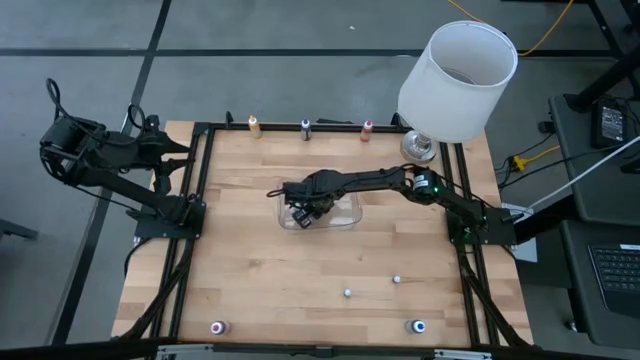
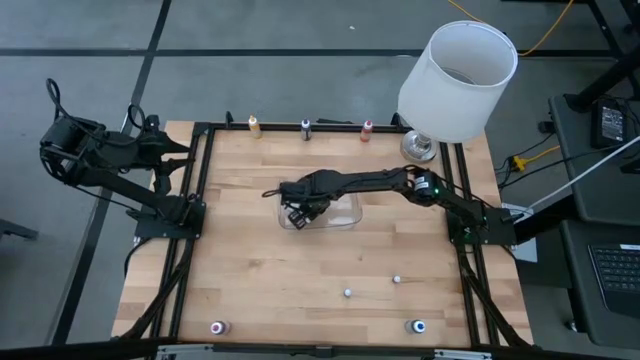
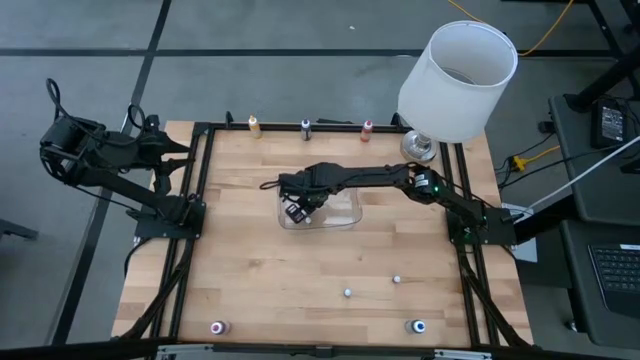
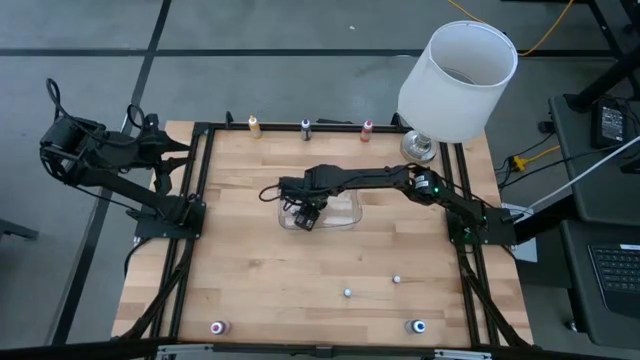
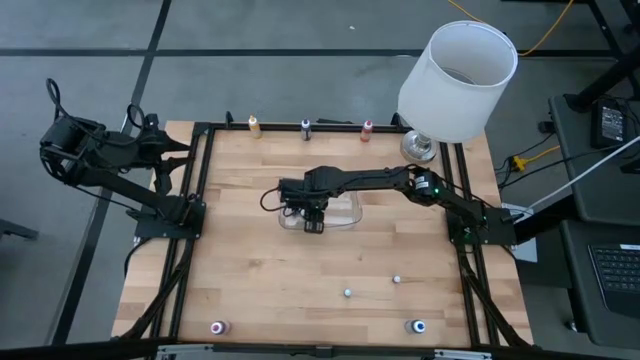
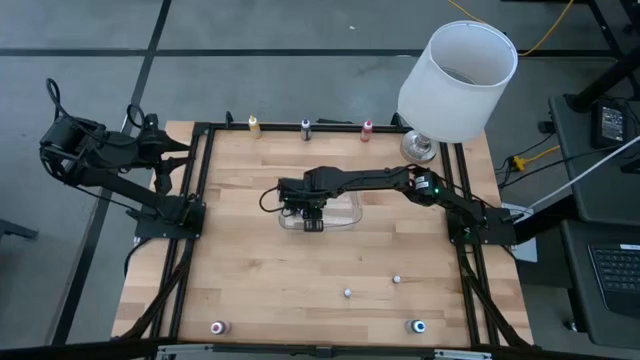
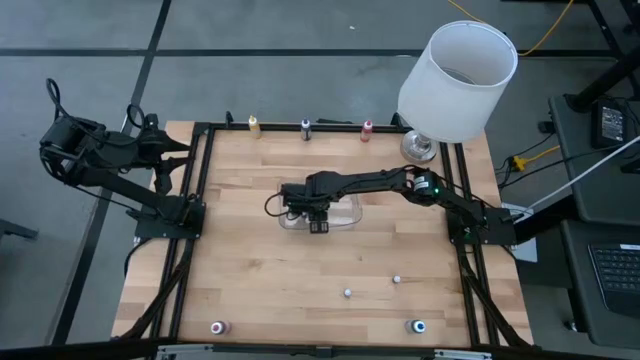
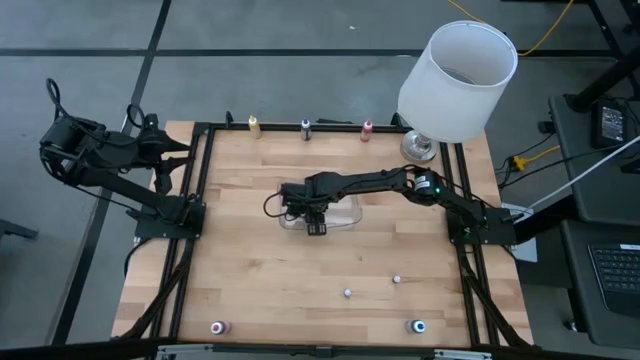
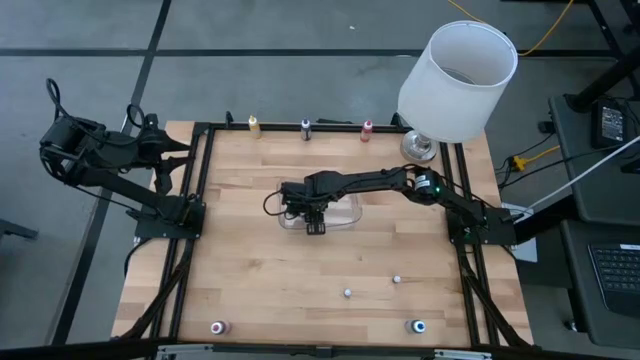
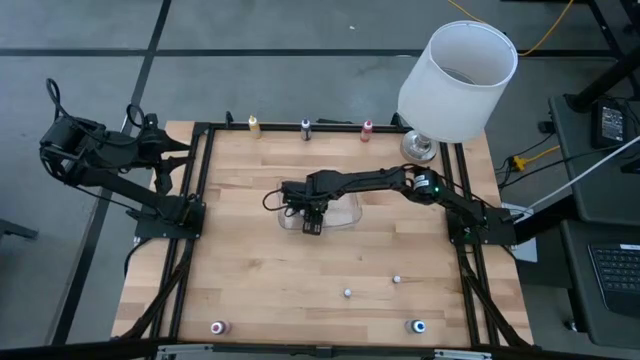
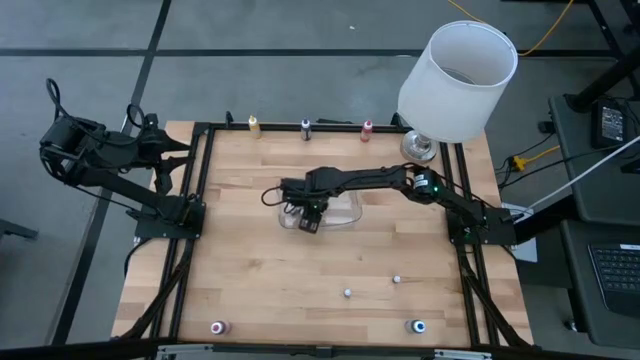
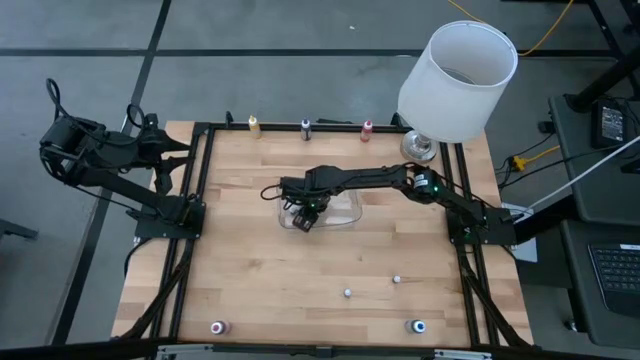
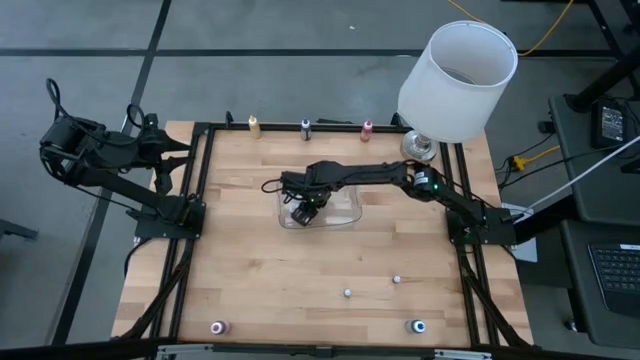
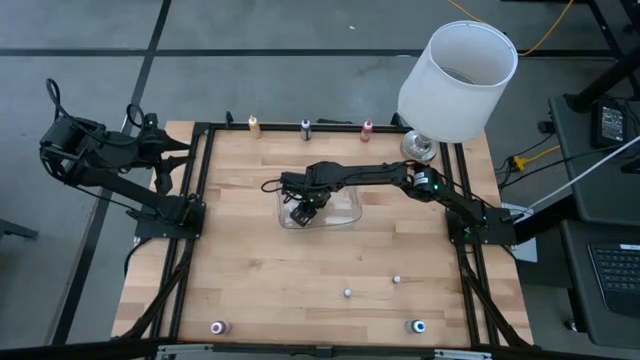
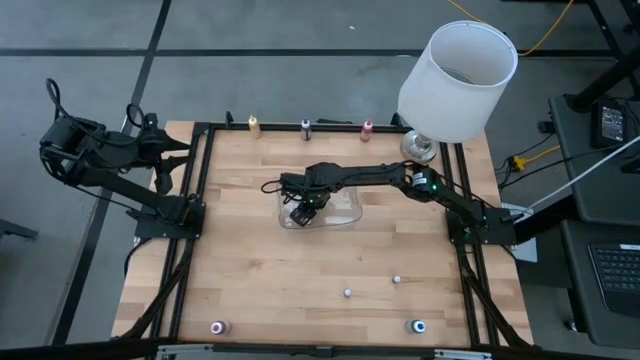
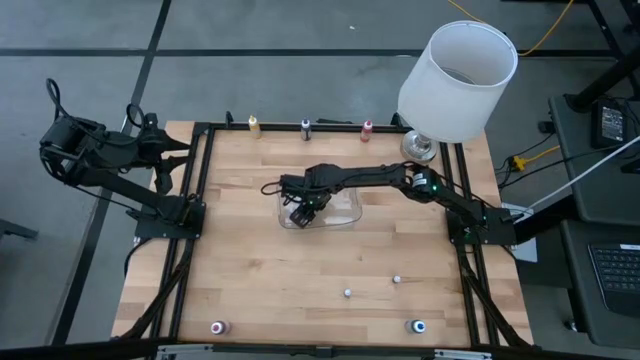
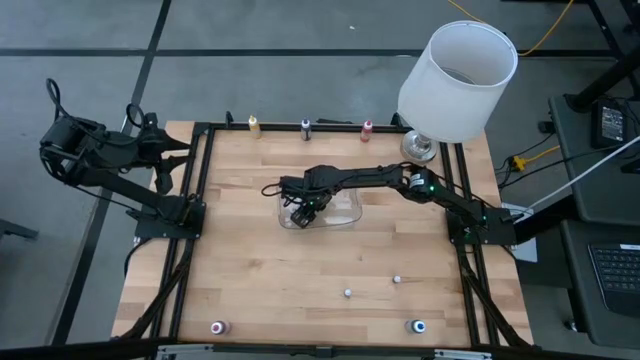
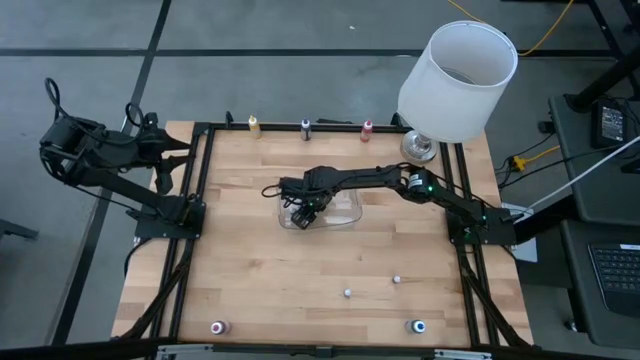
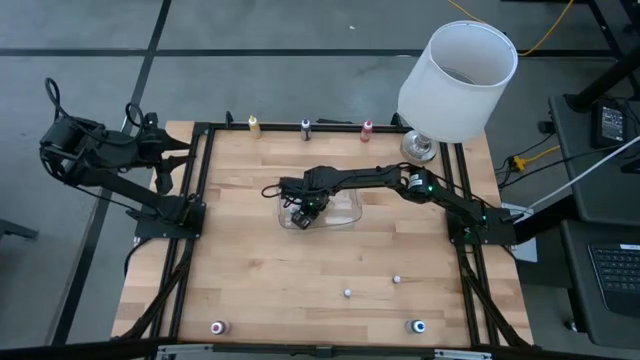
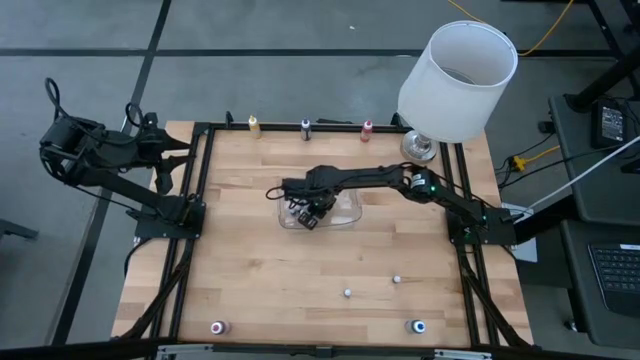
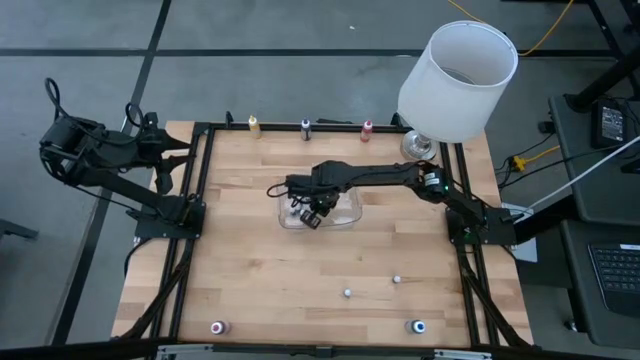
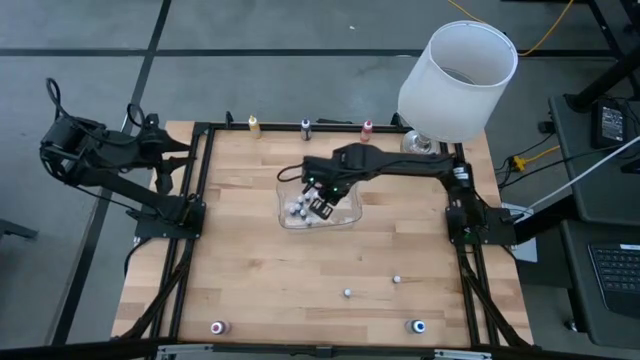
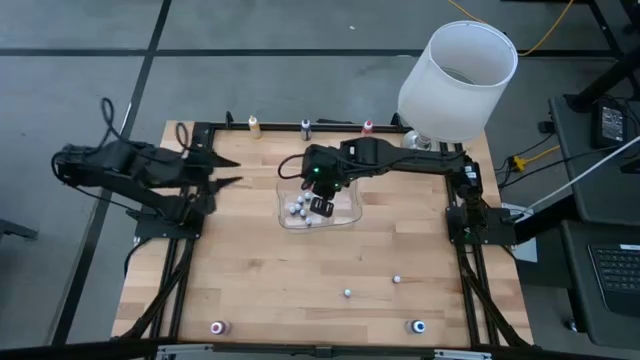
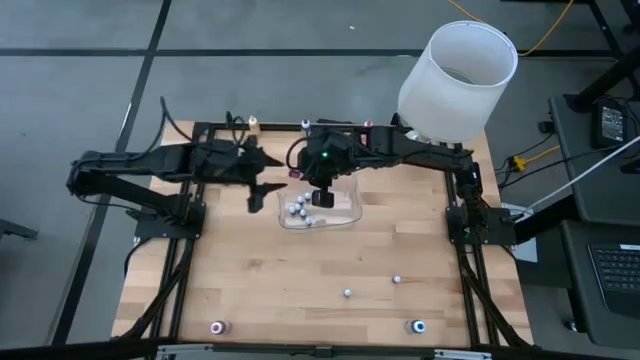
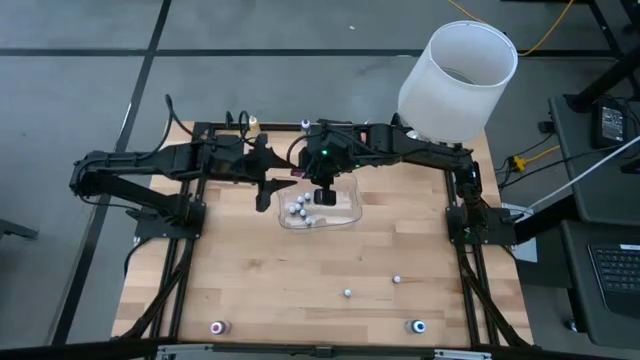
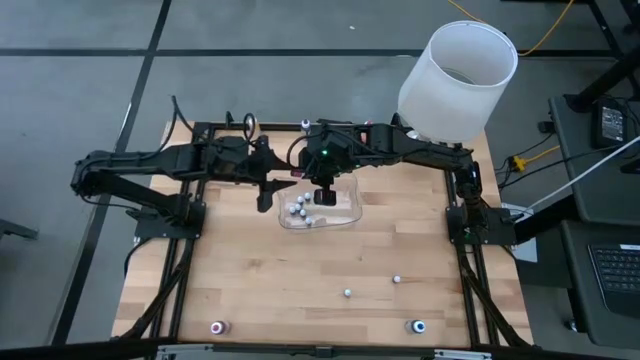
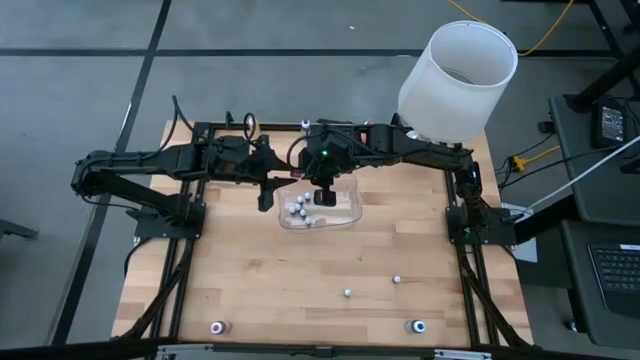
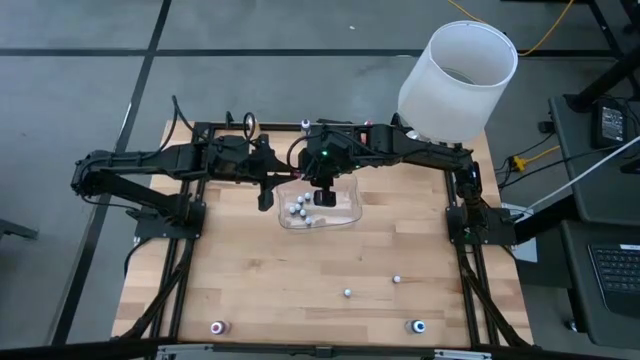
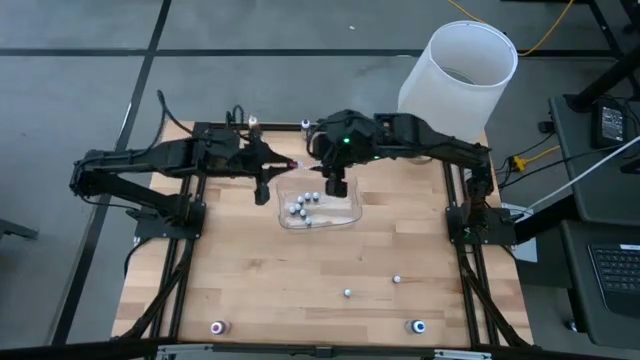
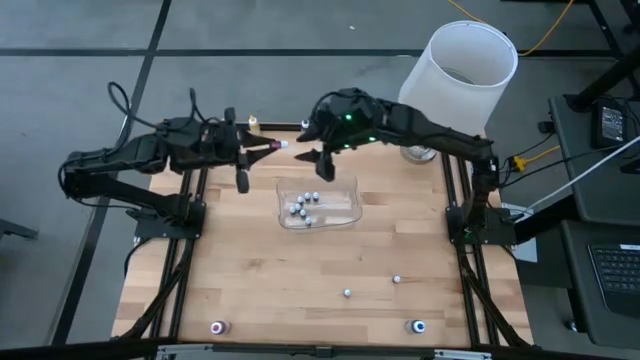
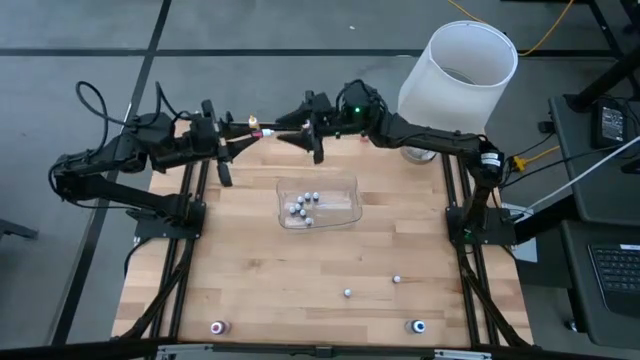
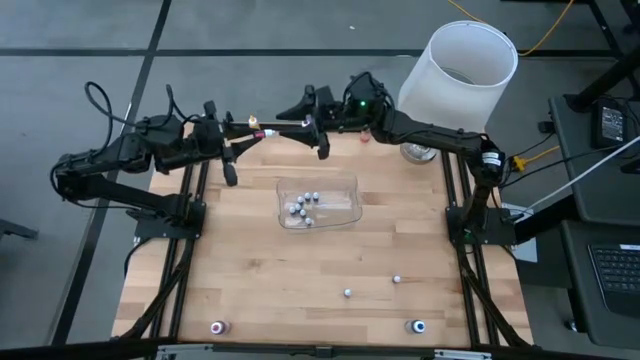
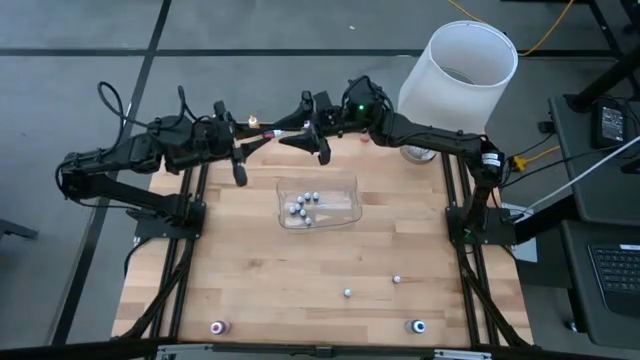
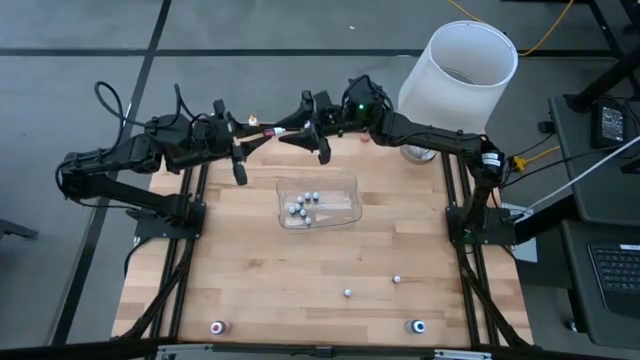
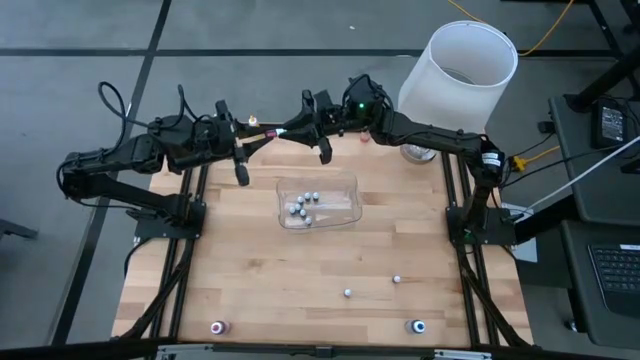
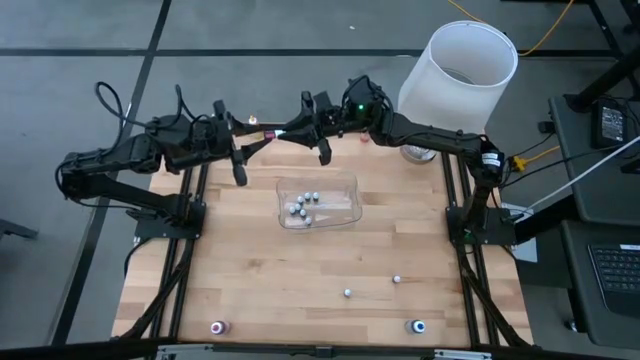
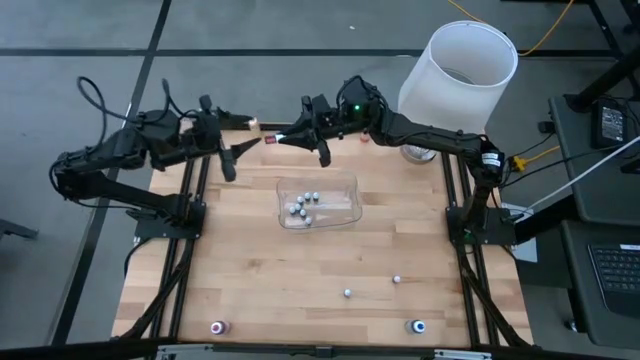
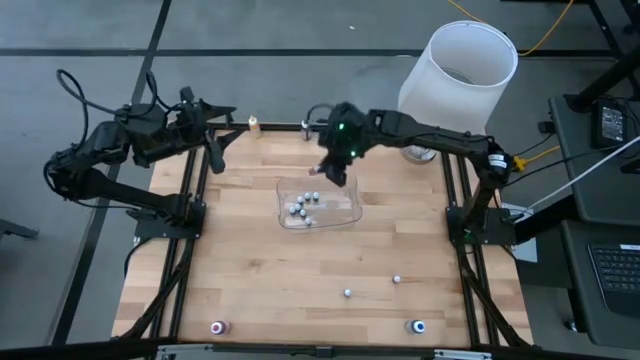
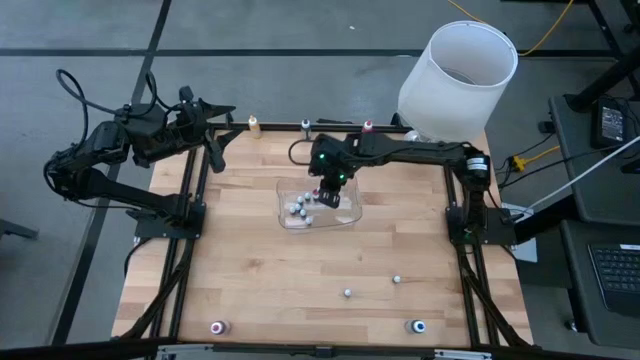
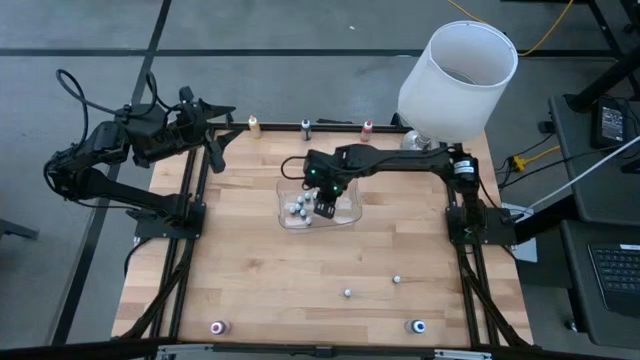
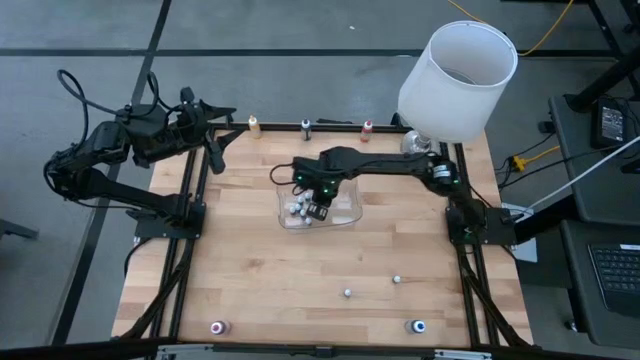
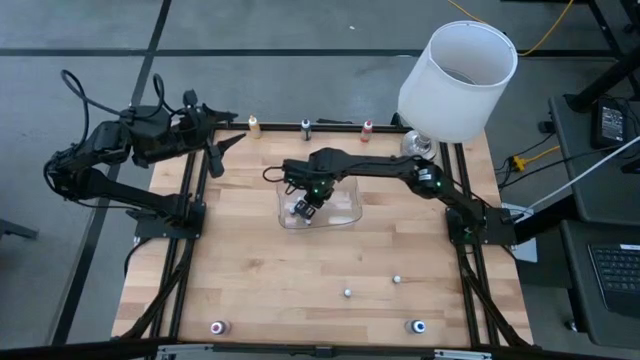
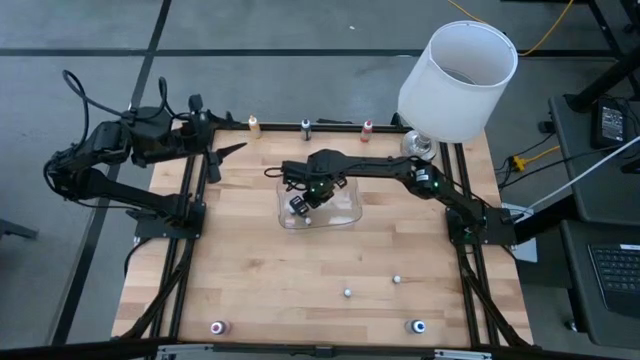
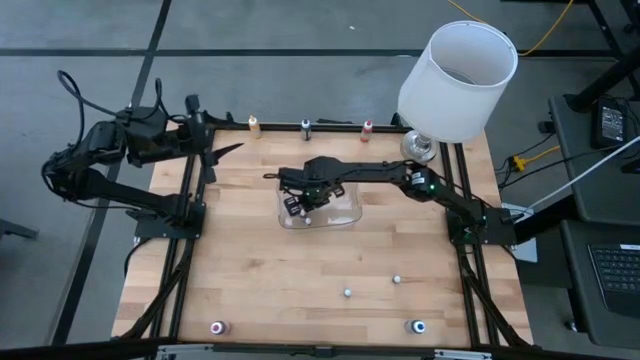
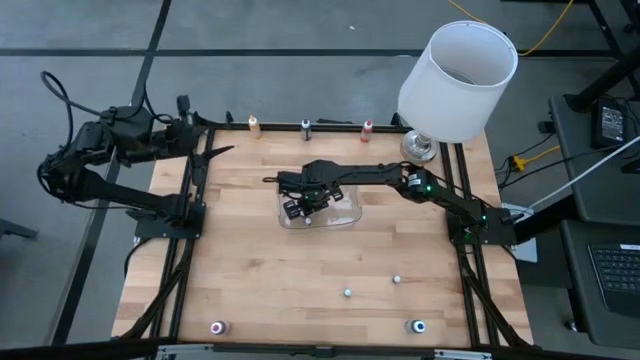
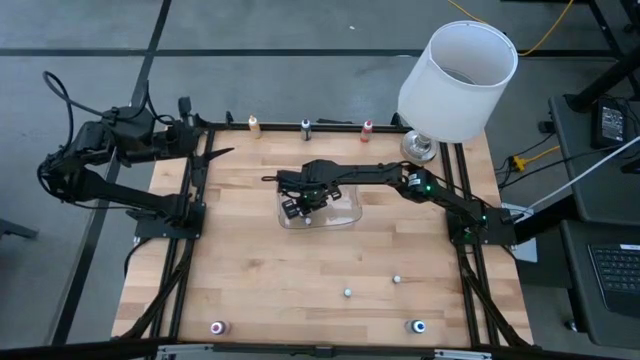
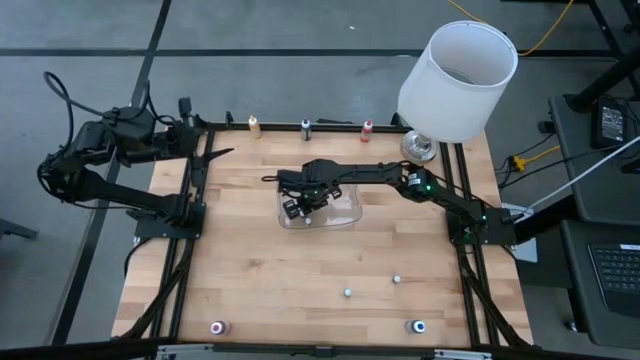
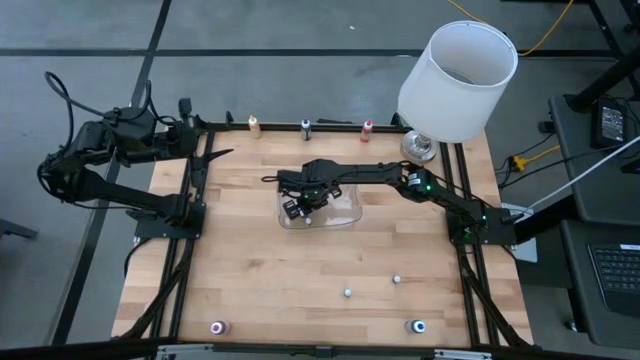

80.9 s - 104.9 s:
Task: Pick & Place food coloring
Put the pink food coloring bottle into the transparent bin
